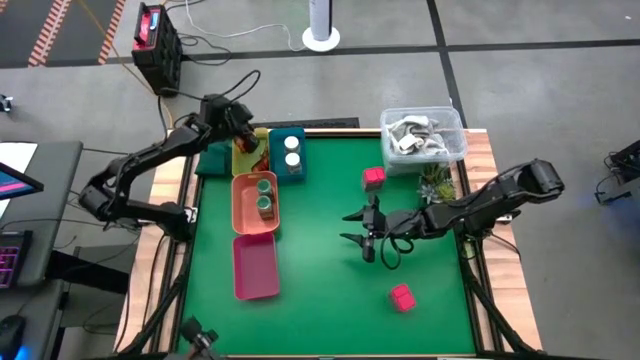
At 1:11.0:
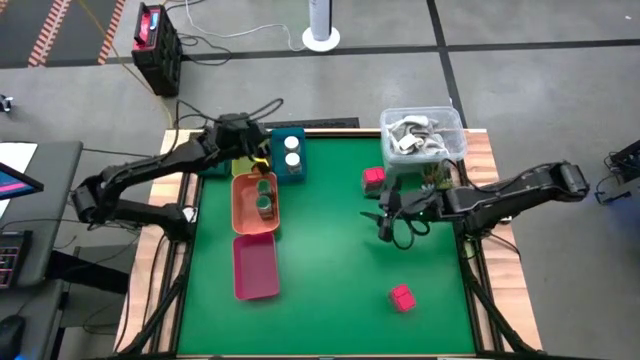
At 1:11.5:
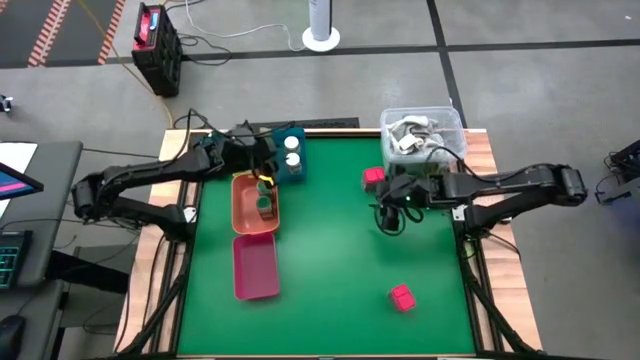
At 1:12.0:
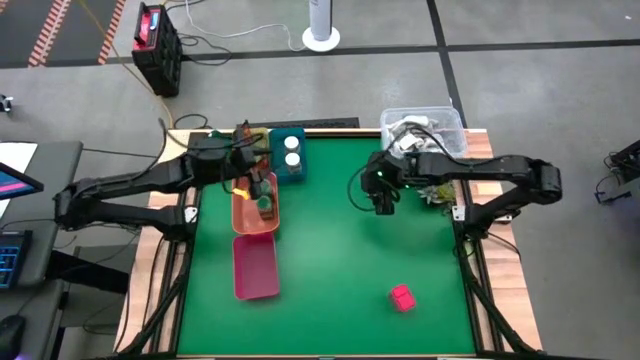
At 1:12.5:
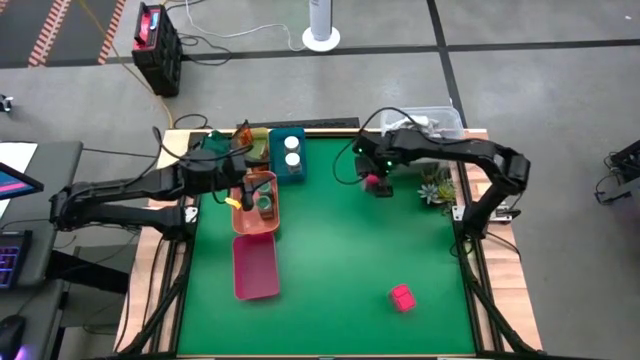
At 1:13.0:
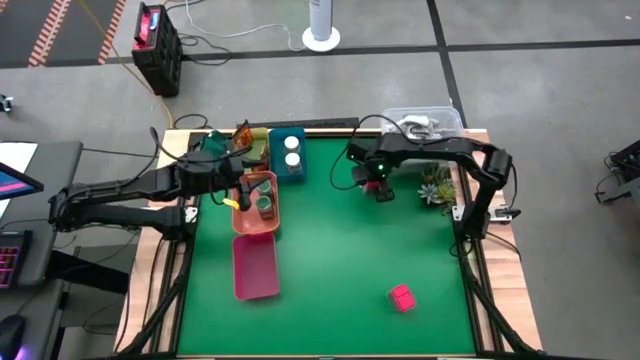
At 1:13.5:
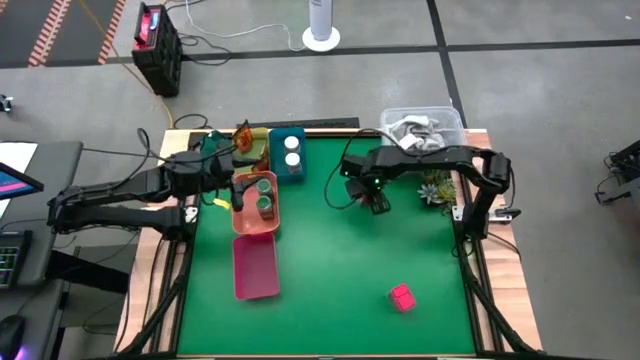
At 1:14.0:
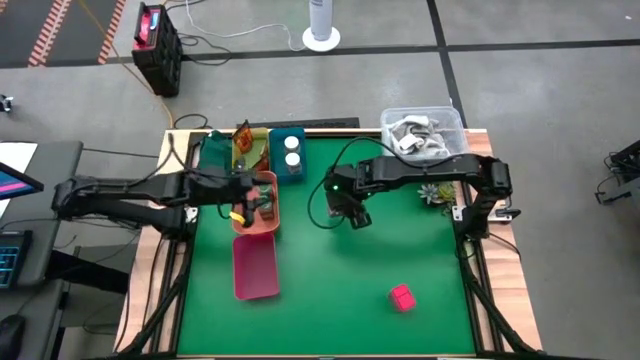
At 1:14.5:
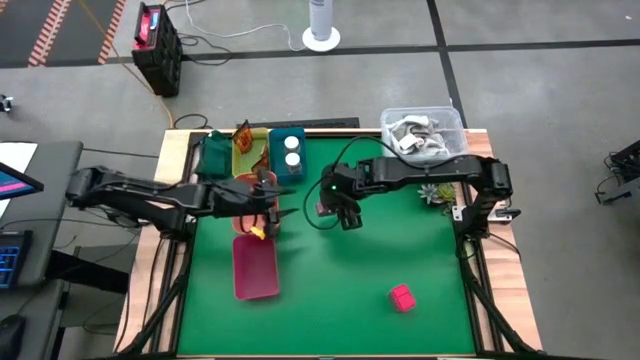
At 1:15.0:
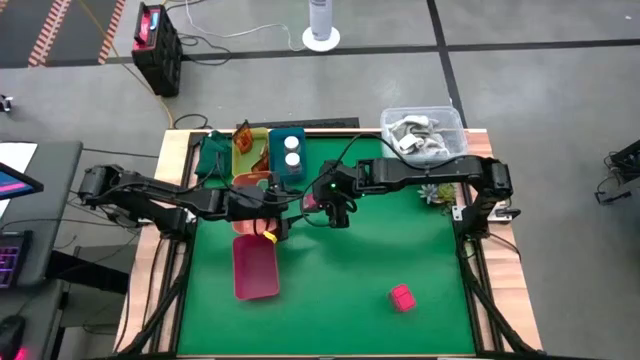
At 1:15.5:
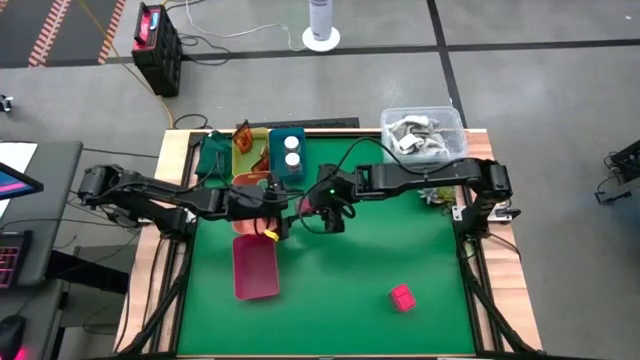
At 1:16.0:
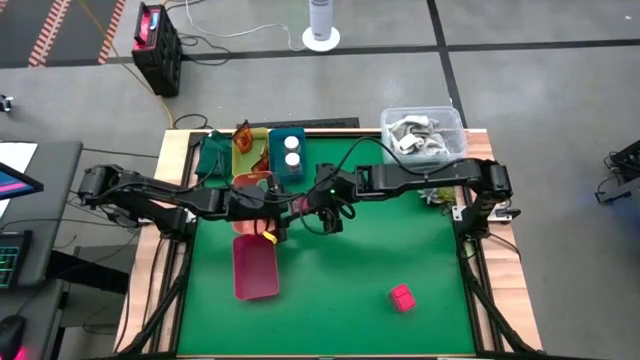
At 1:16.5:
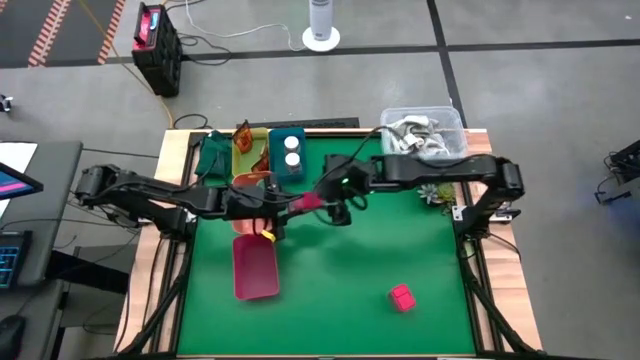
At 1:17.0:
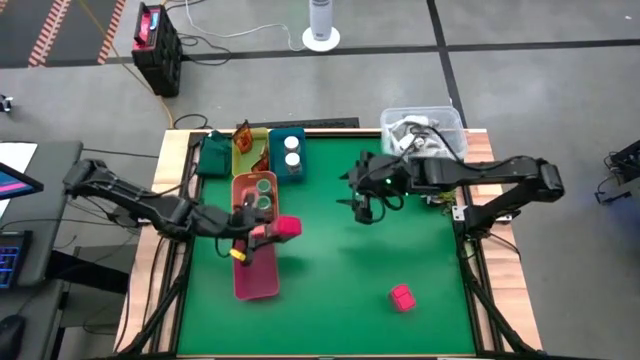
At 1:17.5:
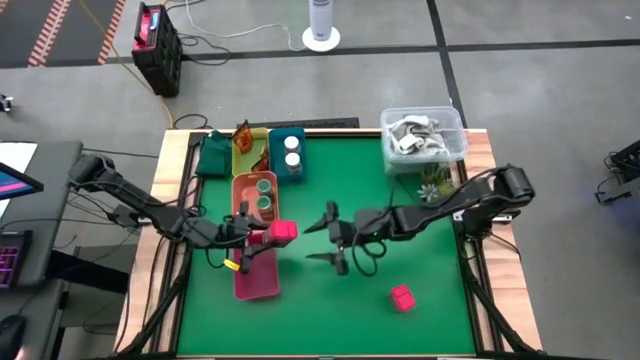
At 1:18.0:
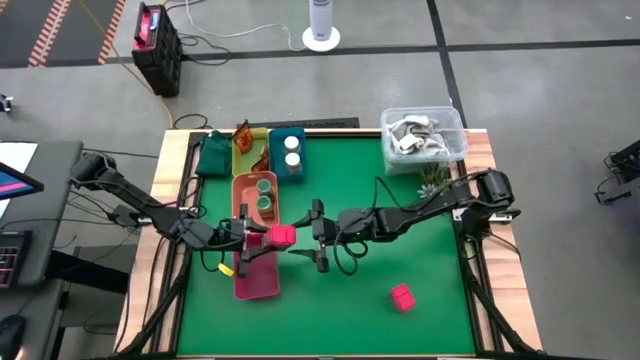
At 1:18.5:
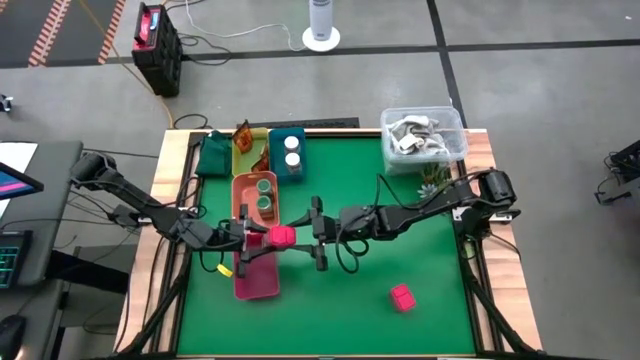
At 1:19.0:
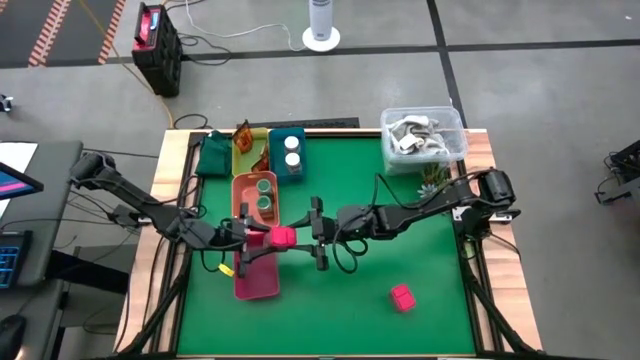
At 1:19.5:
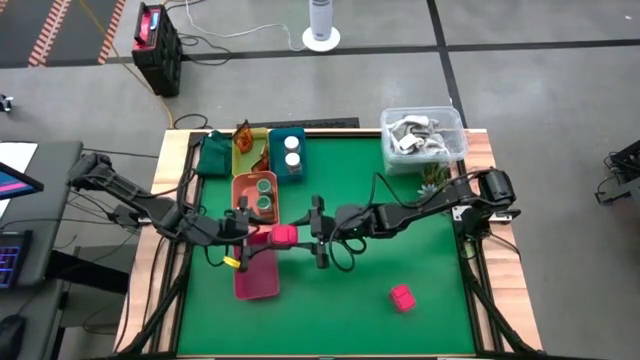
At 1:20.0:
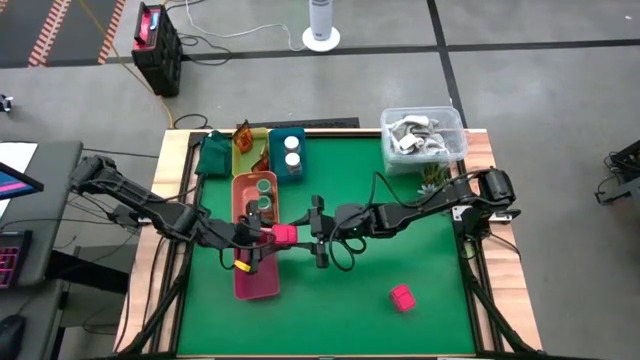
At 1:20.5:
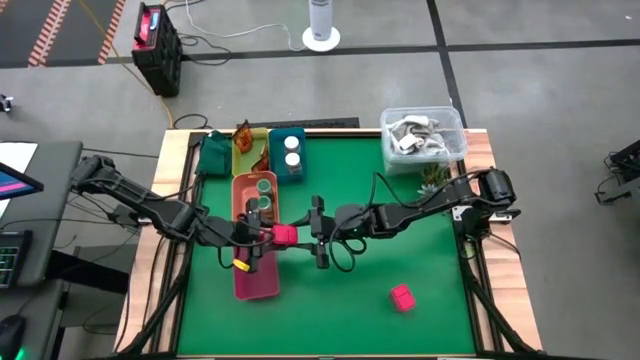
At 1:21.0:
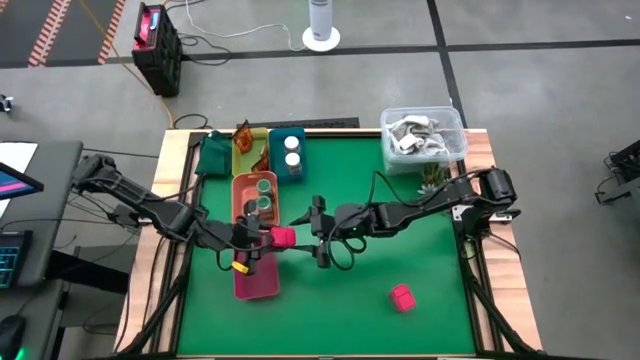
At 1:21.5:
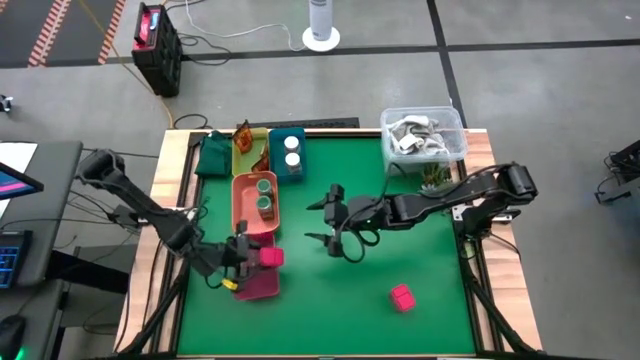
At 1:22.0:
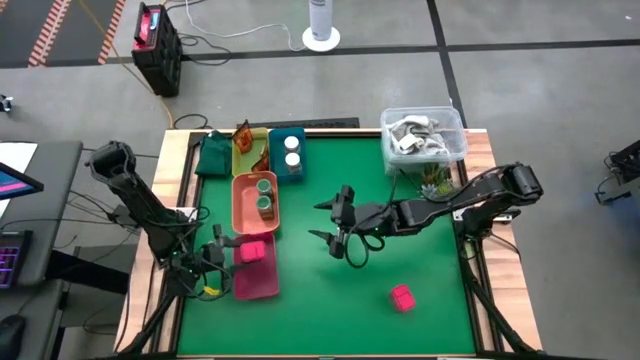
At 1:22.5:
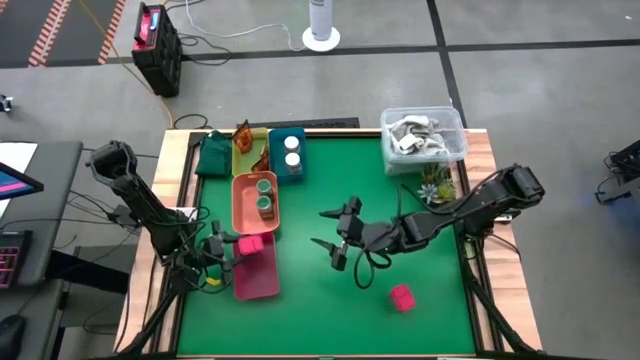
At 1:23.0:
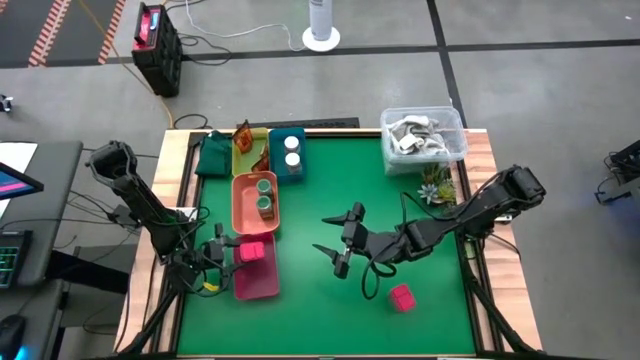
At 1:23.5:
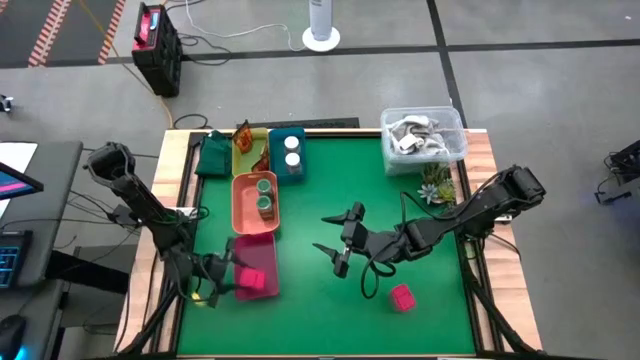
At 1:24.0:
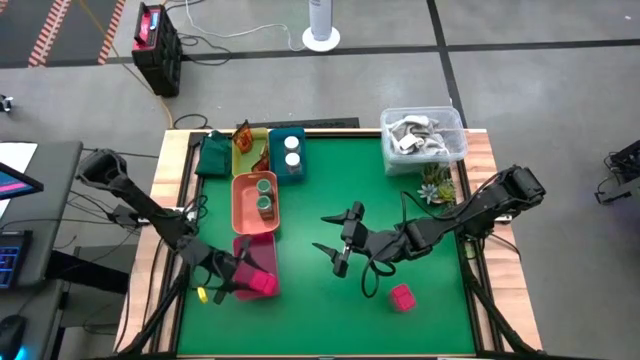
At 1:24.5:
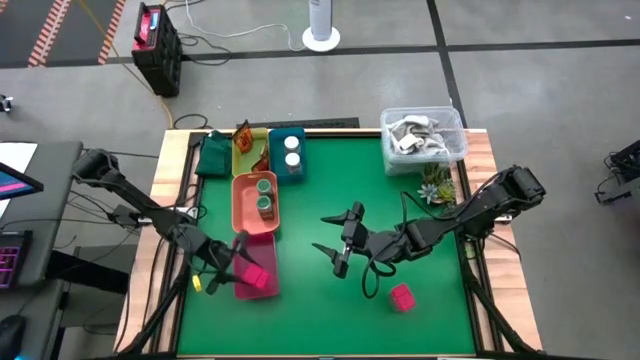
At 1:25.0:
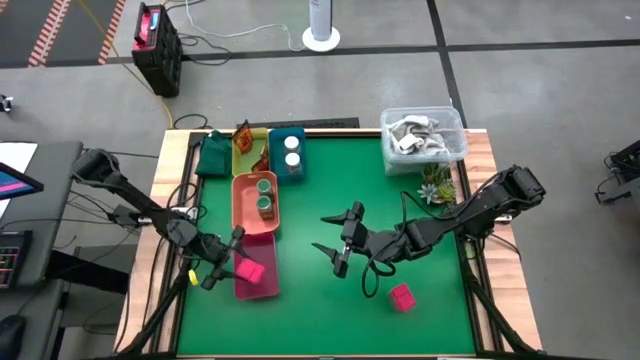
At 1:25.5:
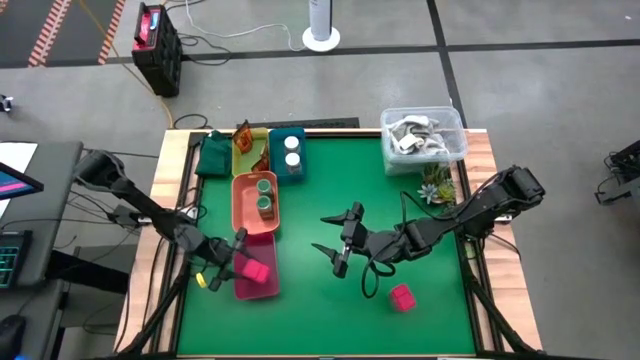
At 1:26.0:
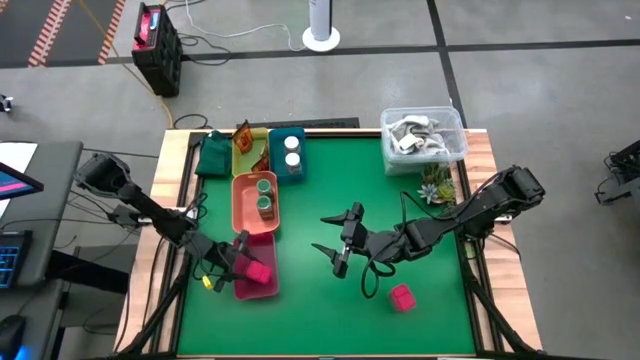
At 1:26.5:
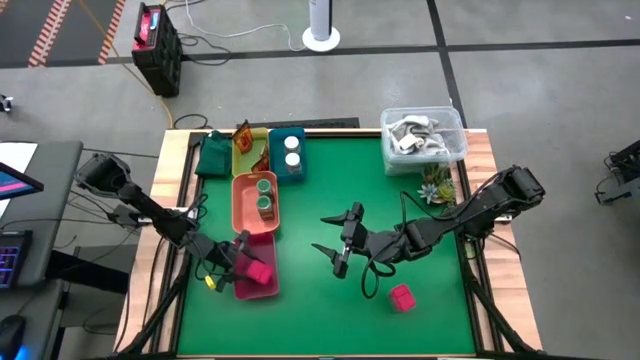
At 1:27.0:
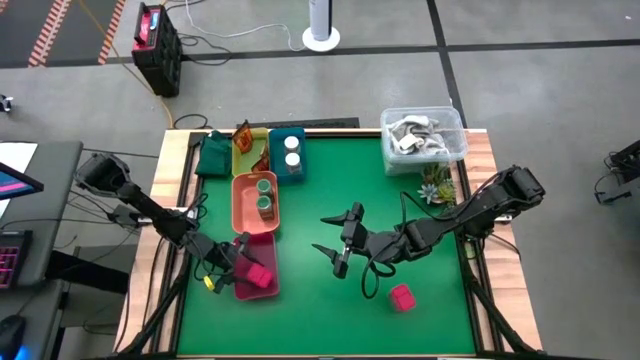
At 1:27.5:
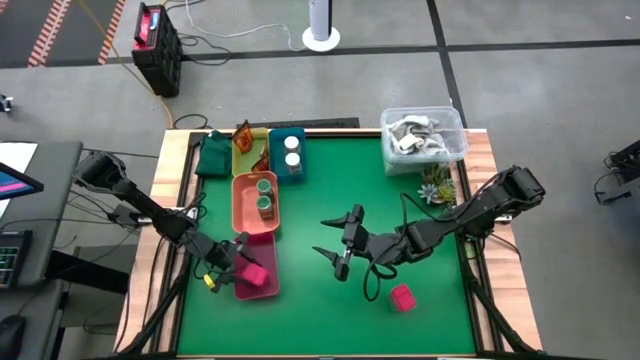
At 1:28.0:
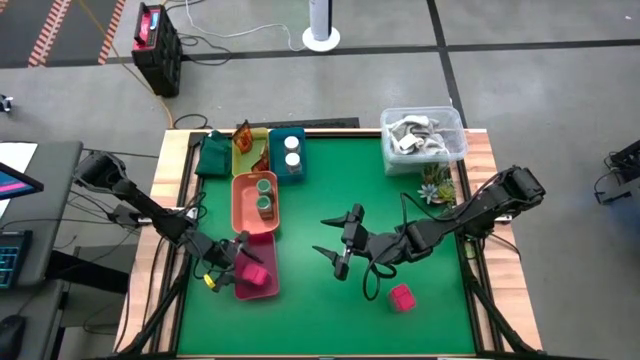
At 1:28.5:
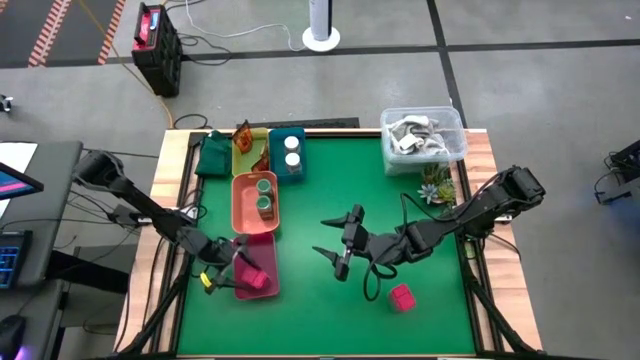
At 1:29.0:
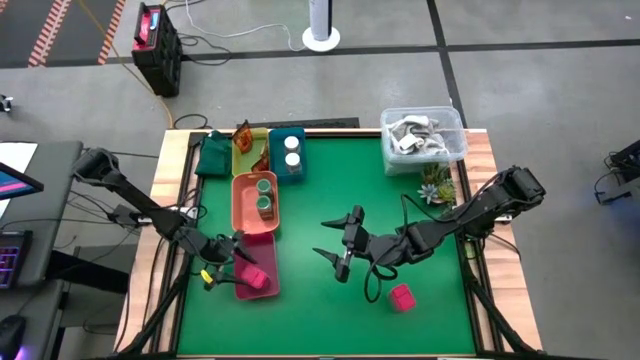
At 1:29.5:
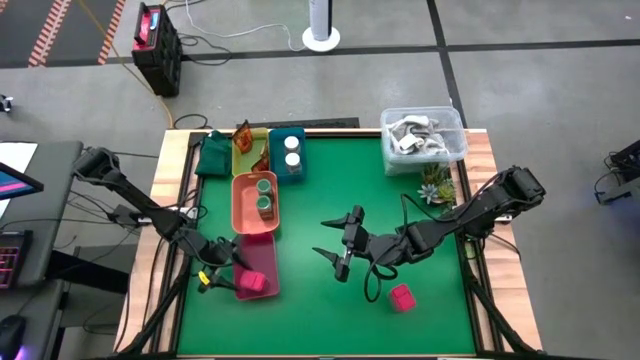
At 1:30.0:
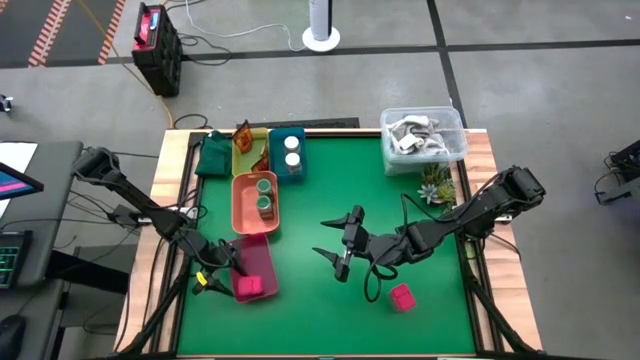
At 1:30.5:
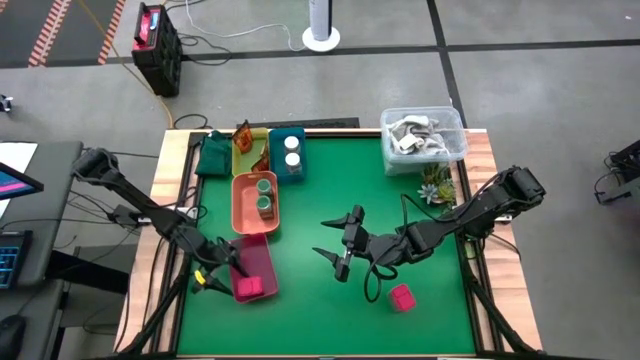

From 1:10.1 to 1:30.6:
Task: Sort spices by type
Put the top red seasoning can into the pink bin

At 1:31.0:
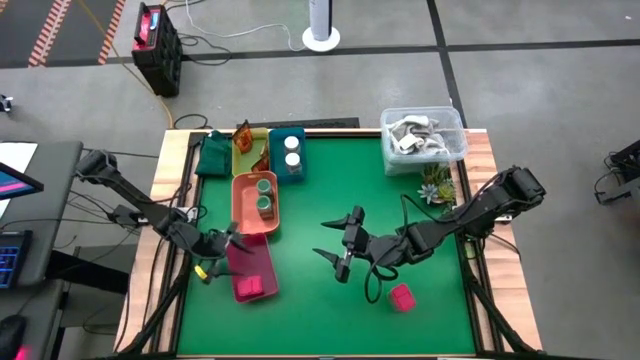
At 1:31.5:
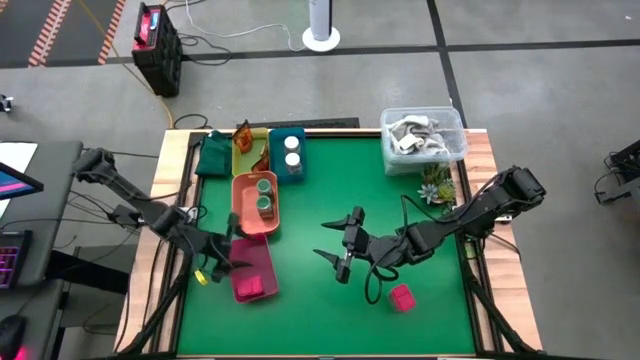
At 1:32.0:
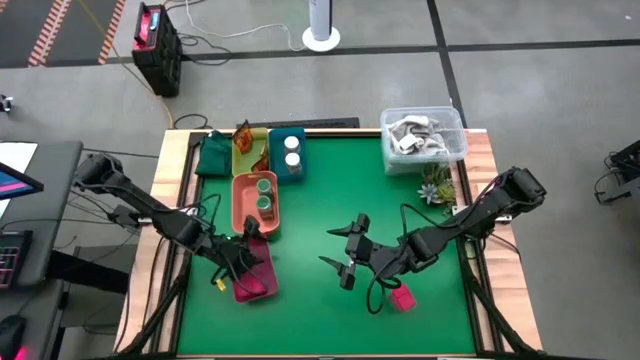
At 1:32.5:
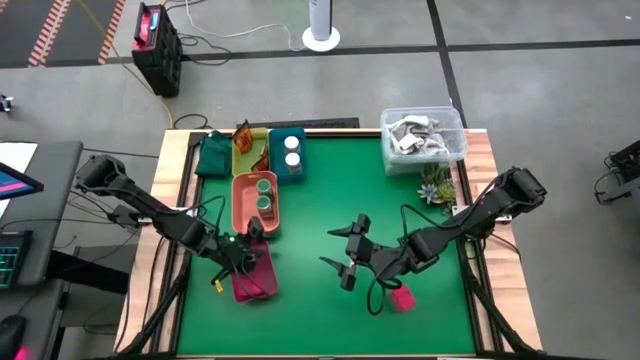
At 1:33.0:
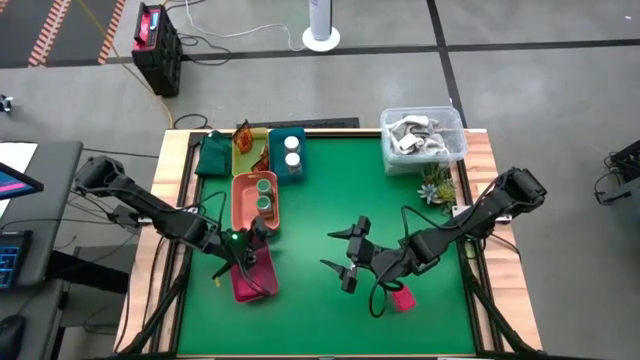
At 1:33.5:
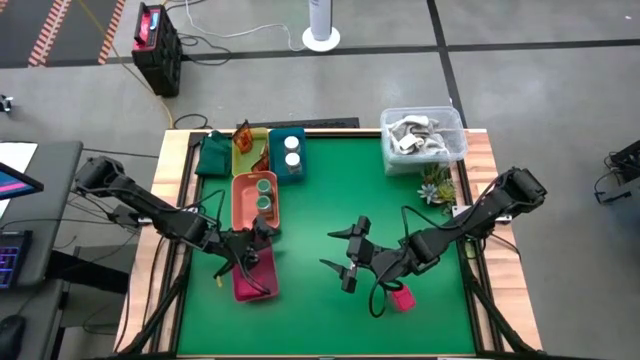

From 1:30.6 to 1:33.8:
Adjust the pink bin
